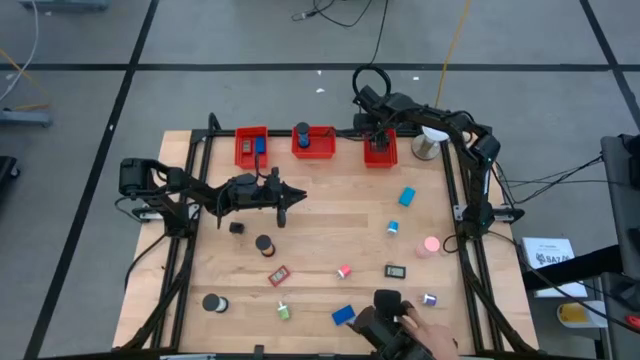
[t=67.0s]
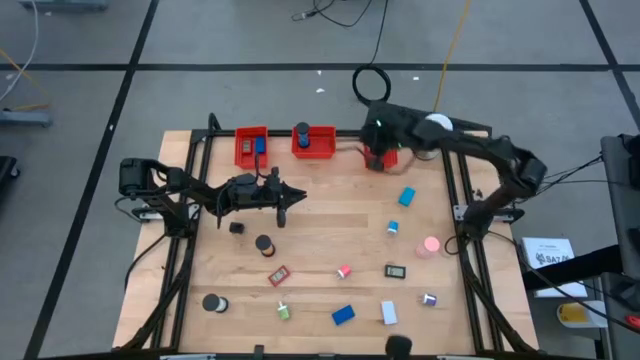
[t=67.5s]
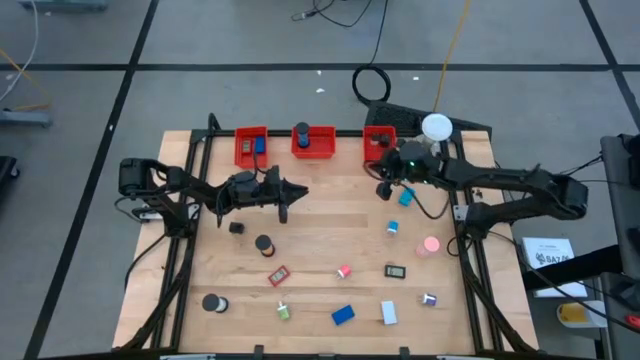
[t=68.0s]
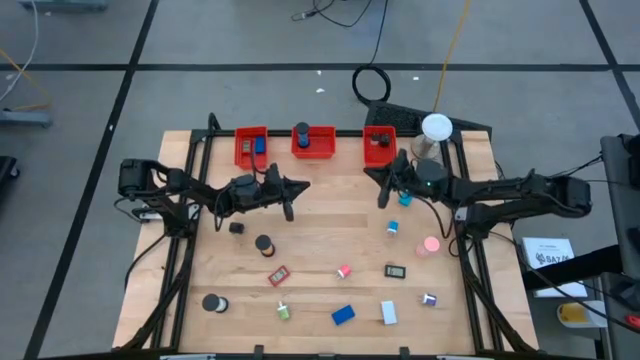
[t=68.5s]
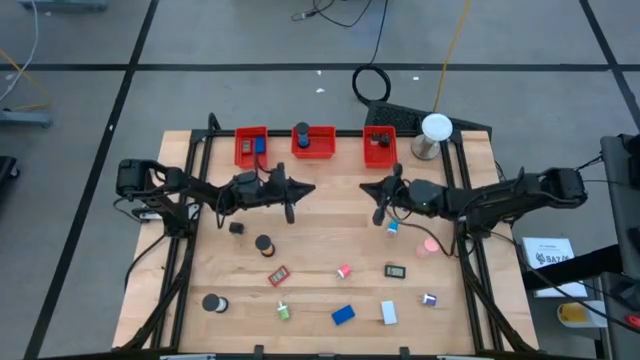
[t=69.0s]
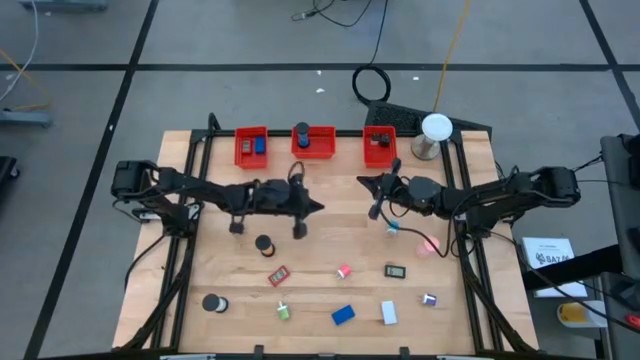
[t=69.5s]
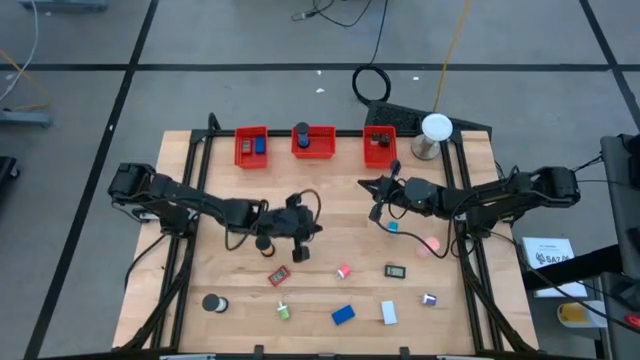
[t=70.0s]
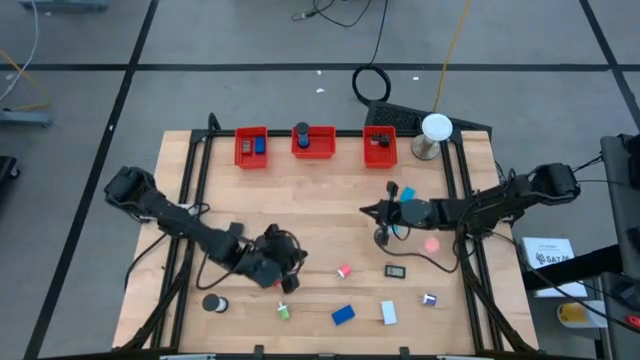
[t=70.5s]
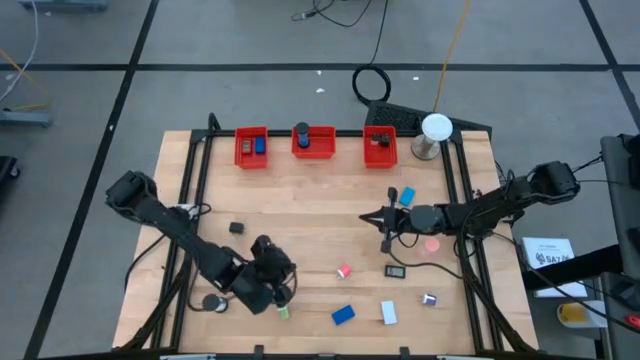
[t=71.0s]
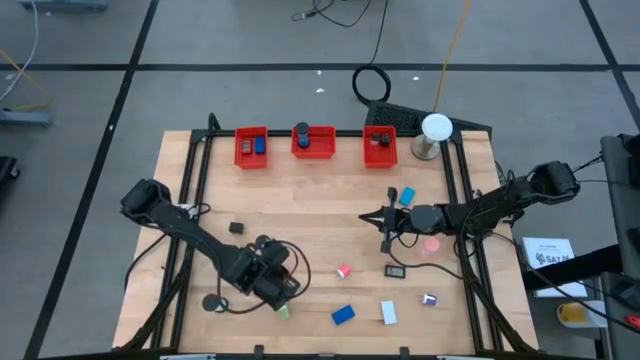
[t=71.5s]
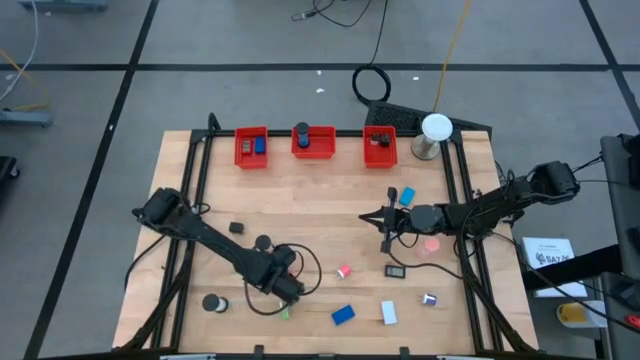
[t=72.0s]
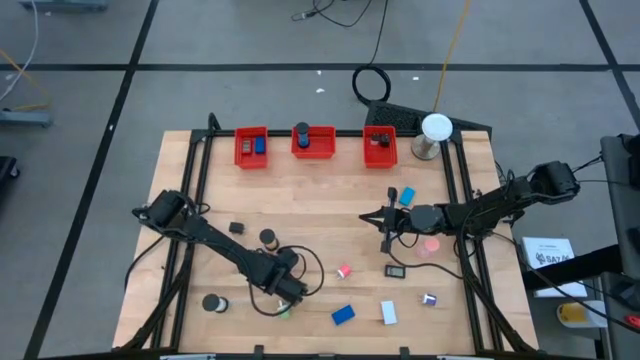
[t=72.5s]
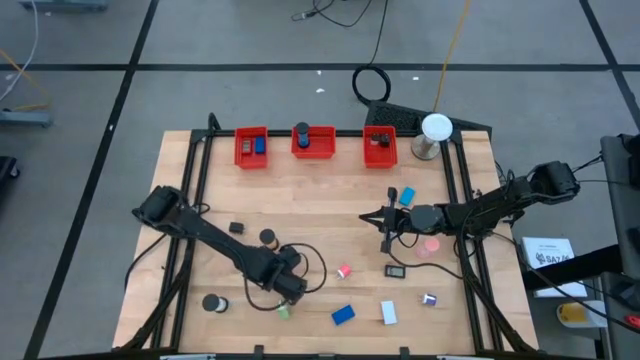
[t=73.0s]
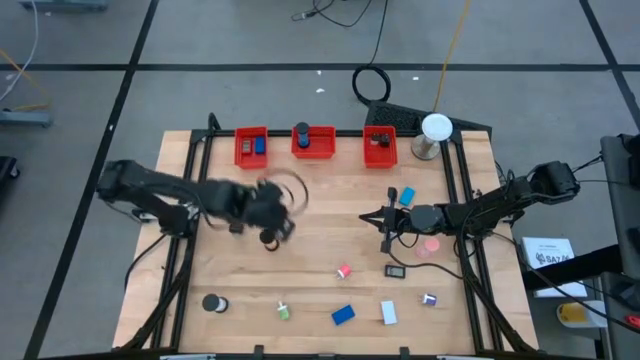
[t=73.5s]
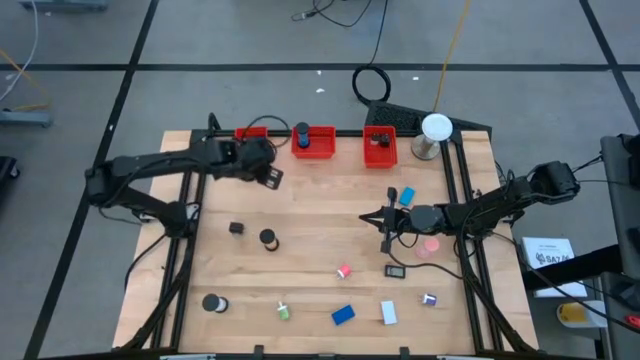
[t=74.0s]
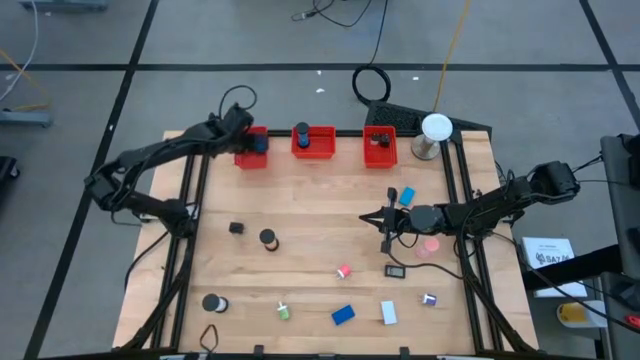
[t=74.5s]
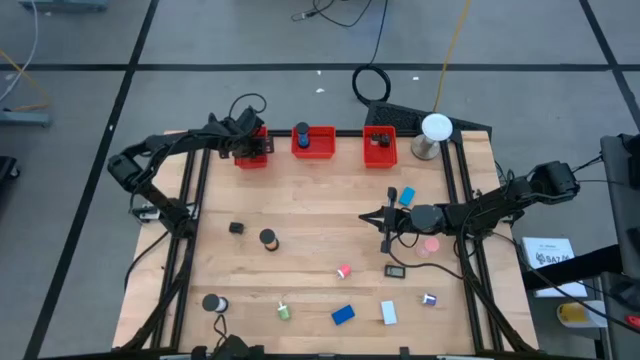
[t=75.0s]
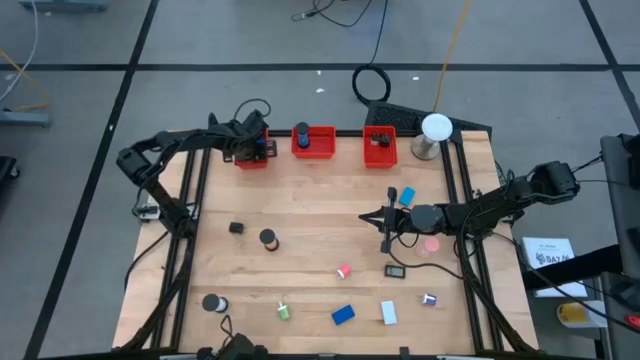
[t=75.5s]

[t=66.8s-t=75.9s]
Task: Pick & Place Office items
Put the orange timer into the left orange basket

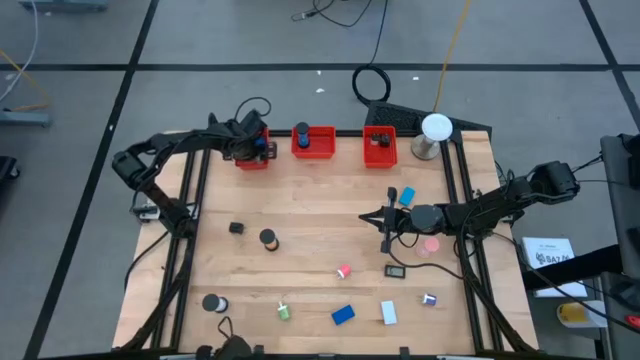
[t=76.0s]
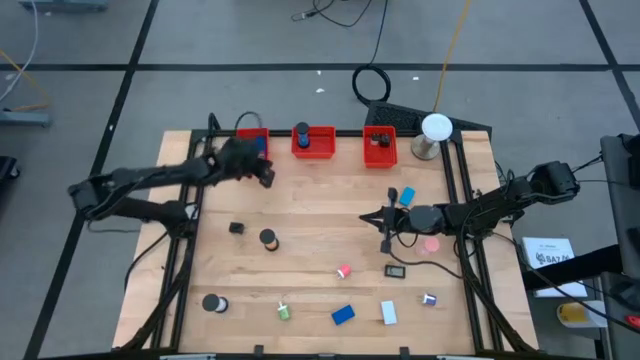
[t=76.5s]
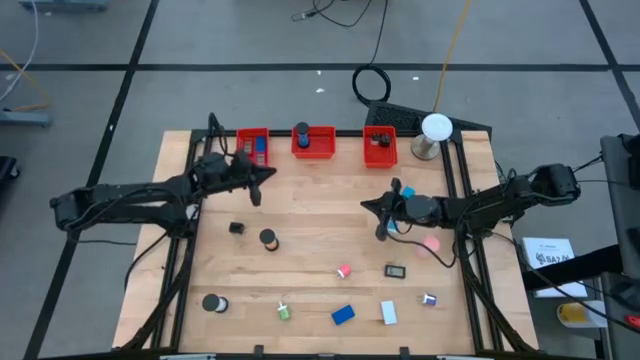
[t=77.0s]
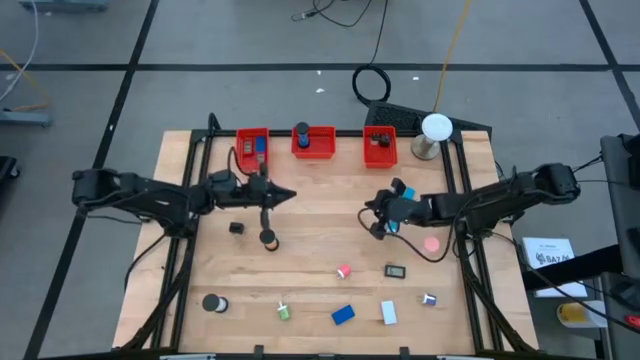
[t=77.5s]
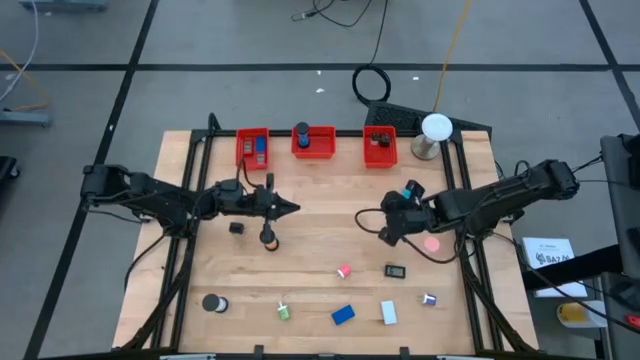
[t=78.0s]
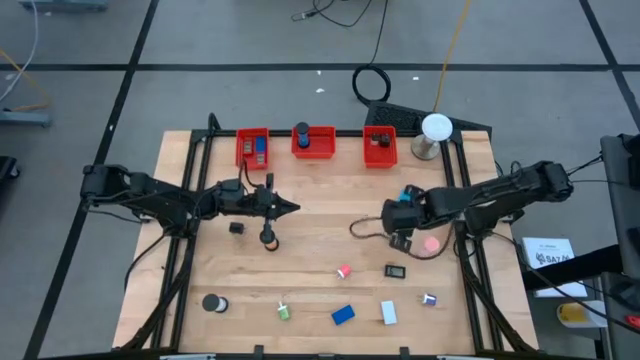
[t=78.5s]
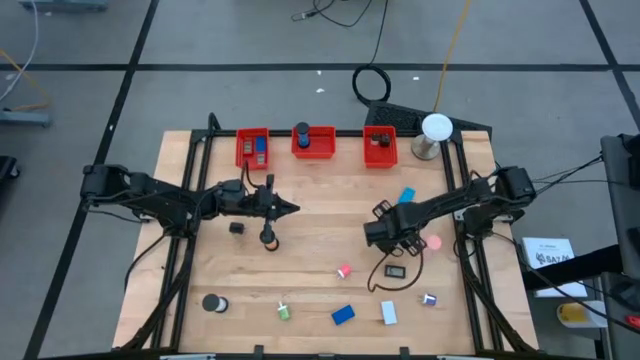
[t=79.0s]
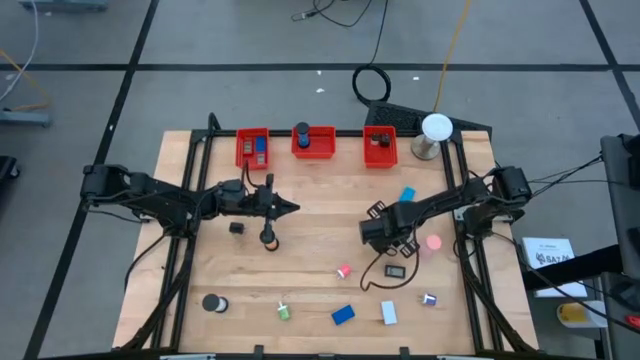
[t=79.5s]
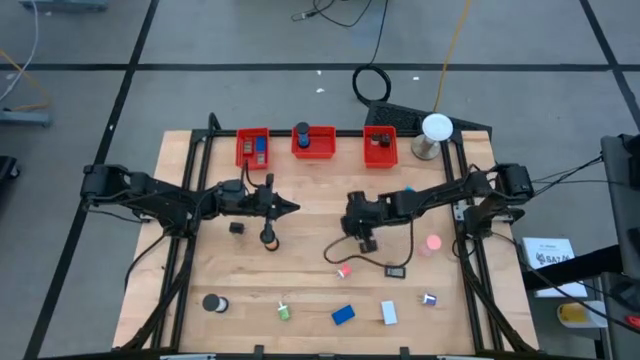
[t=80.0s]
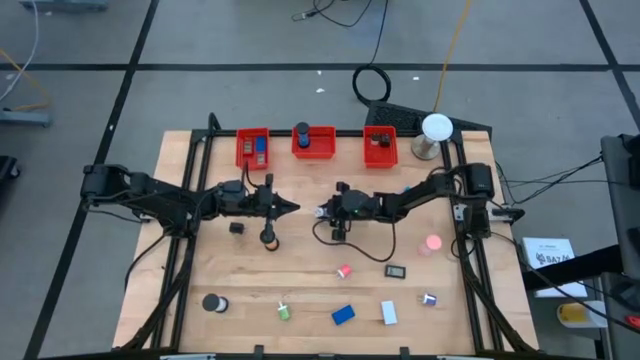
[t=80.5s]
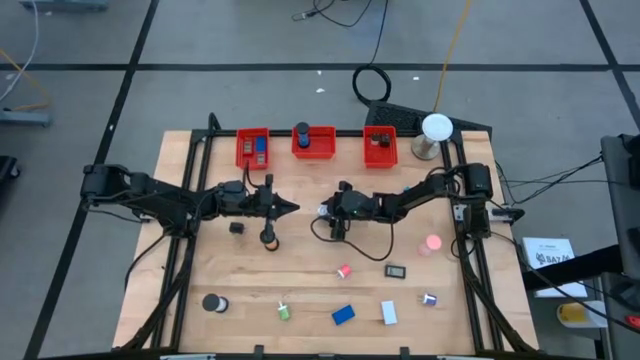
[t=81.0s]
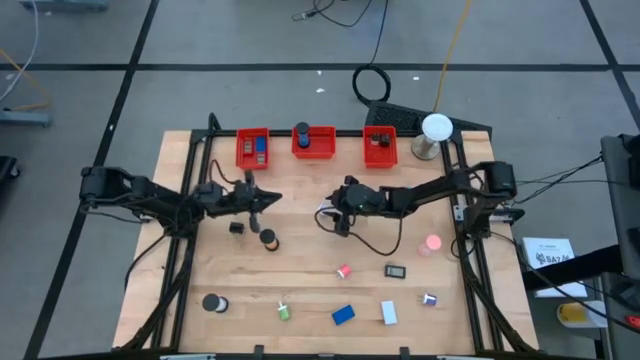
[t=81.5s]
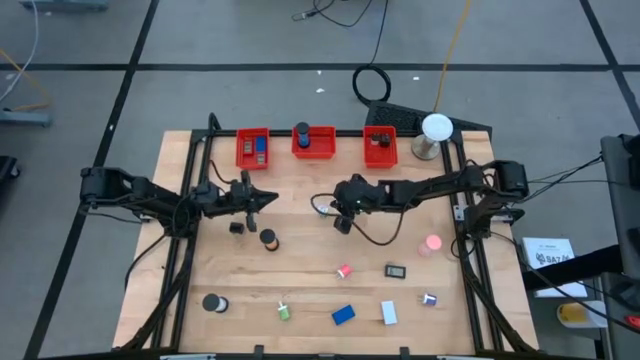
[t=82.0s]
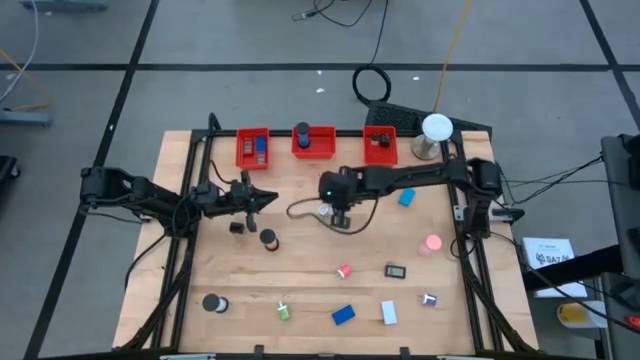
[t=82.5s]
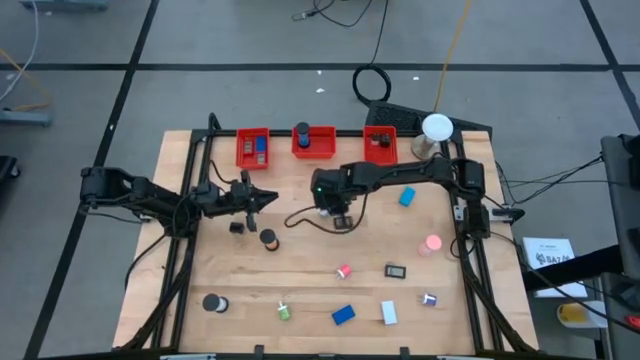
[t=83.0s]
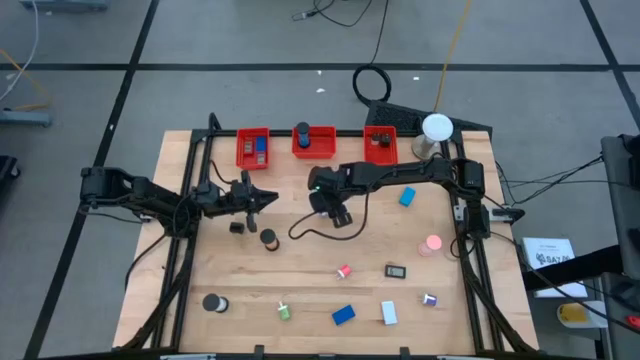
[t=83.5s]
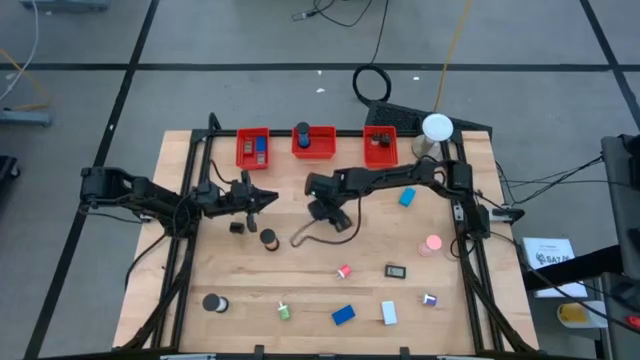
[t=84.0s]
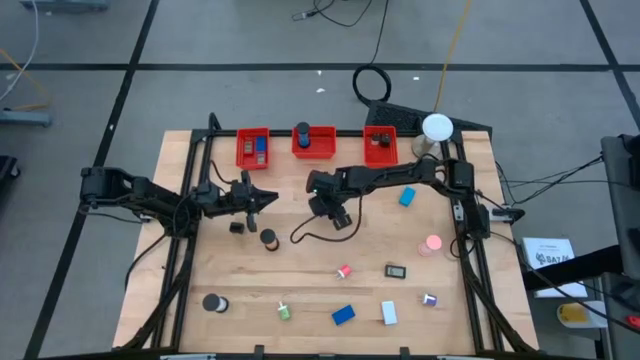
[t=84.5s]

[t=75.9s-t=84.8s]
Put the blue charger adapter into the right orange basket

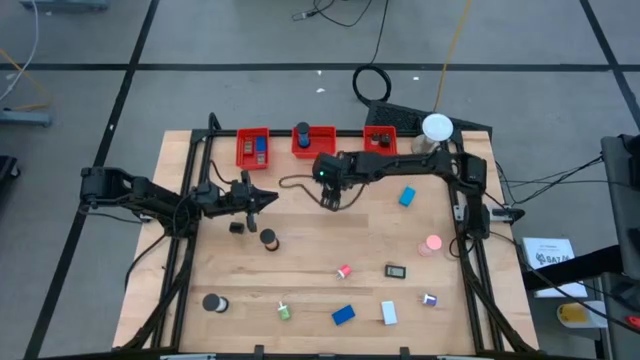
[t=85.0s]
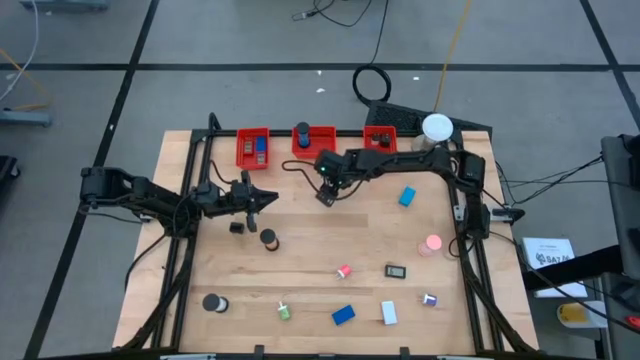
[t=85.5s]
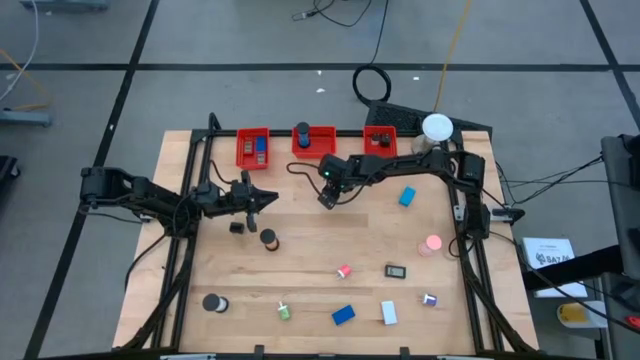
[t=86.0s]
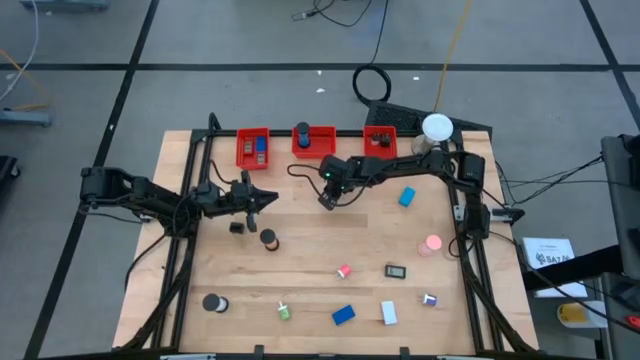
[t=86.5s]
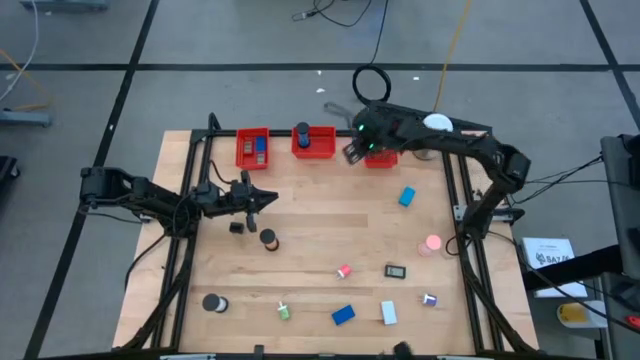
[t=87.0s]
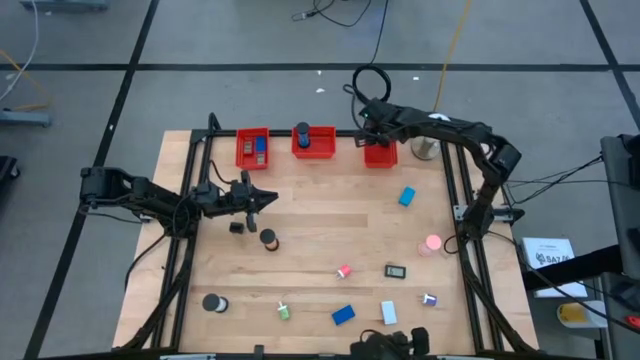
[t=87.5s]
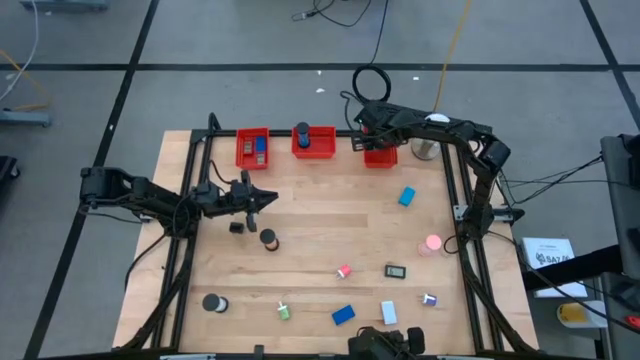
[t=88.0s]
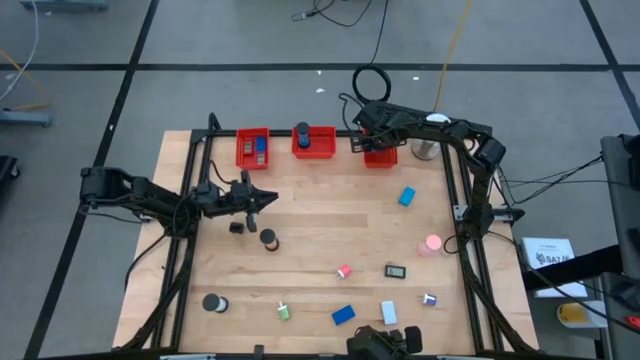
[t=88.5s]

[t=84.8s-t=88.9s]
Put the blue charger adapter into the right orange basket
